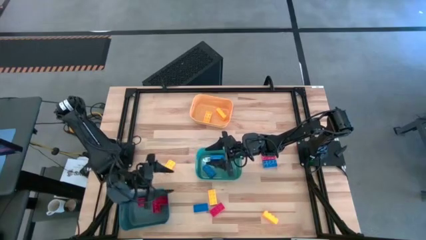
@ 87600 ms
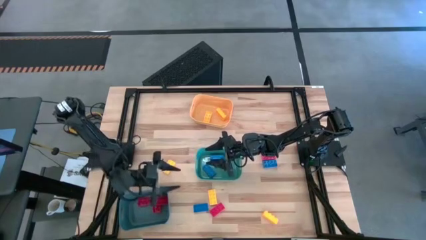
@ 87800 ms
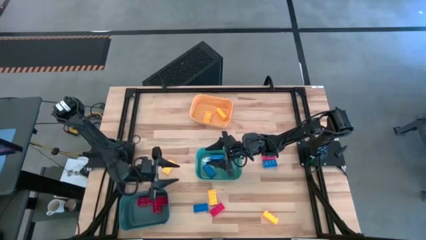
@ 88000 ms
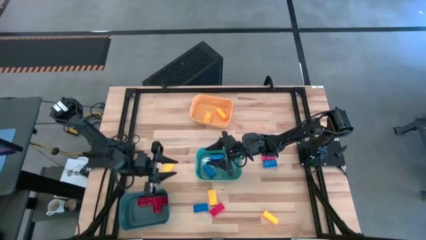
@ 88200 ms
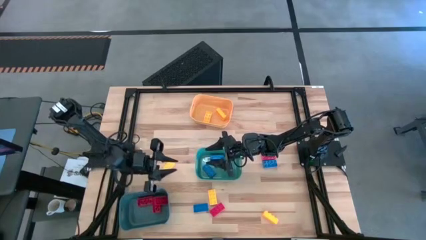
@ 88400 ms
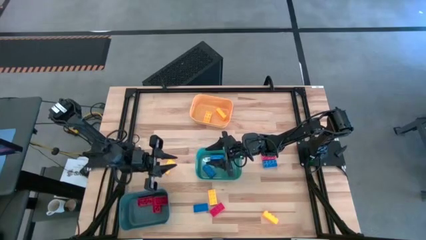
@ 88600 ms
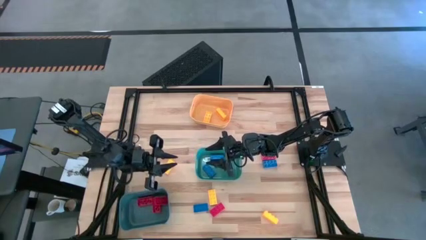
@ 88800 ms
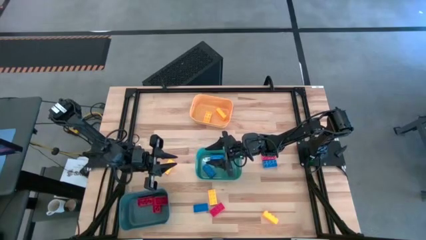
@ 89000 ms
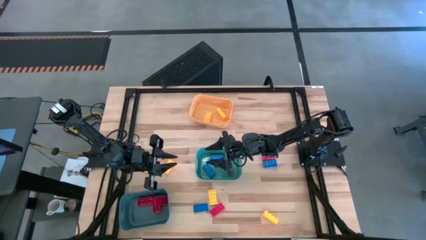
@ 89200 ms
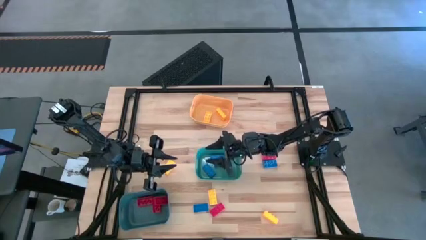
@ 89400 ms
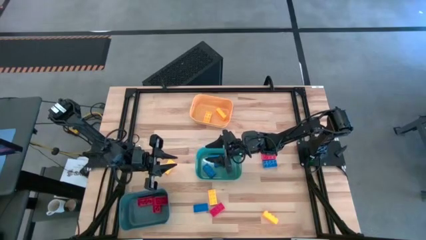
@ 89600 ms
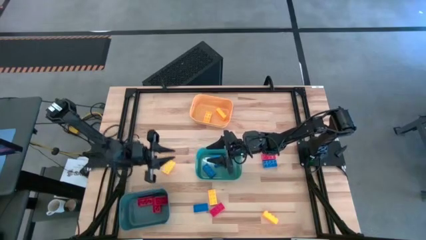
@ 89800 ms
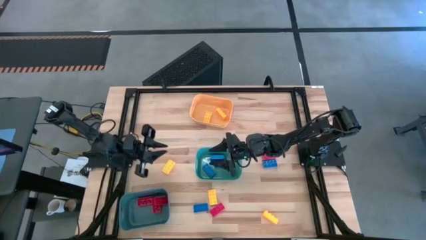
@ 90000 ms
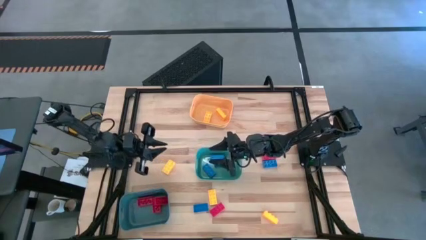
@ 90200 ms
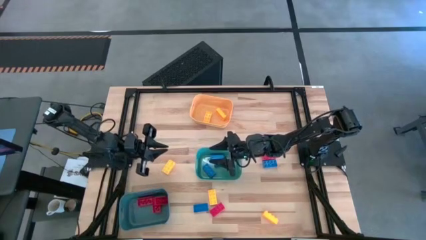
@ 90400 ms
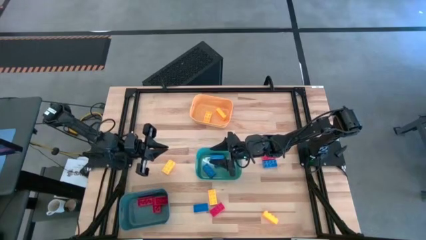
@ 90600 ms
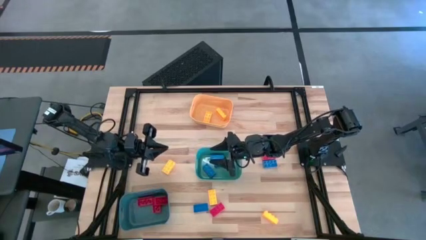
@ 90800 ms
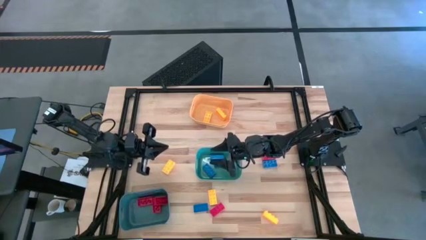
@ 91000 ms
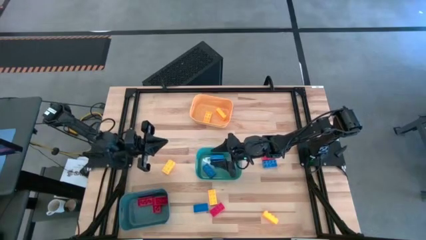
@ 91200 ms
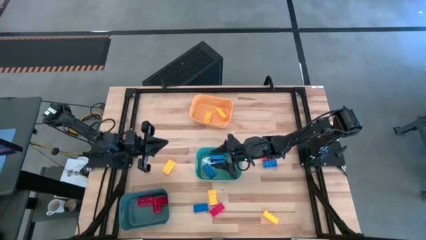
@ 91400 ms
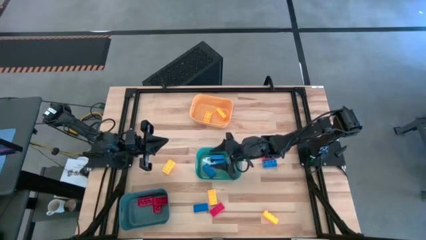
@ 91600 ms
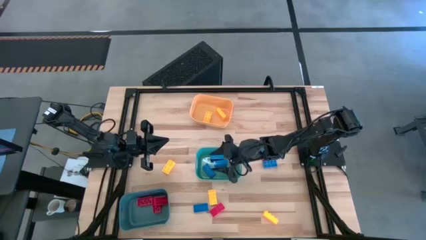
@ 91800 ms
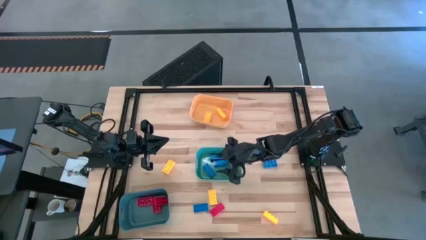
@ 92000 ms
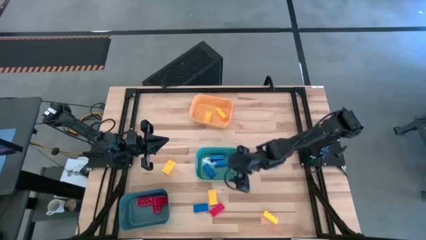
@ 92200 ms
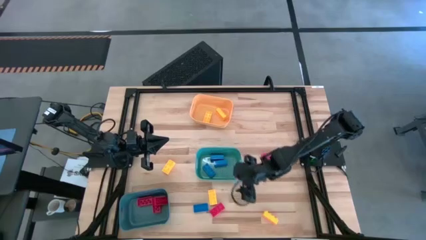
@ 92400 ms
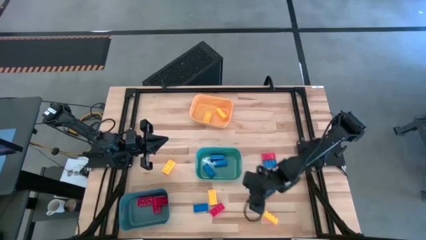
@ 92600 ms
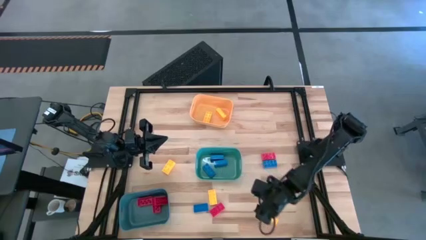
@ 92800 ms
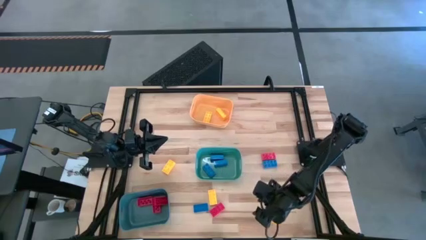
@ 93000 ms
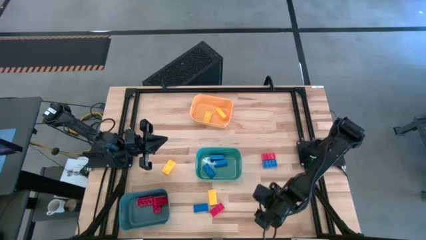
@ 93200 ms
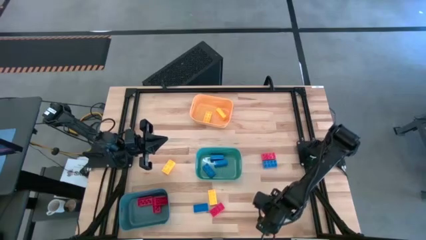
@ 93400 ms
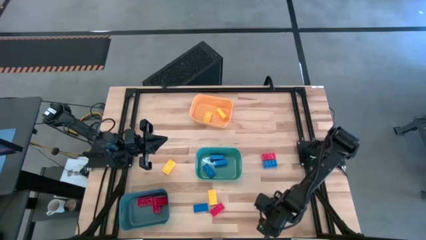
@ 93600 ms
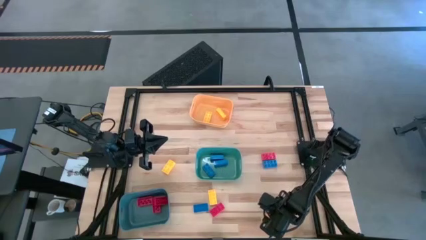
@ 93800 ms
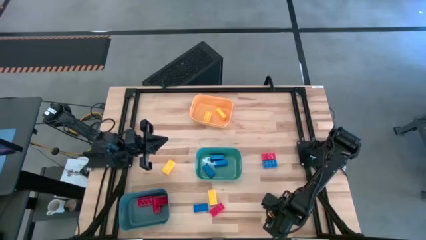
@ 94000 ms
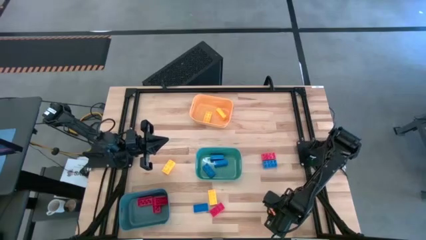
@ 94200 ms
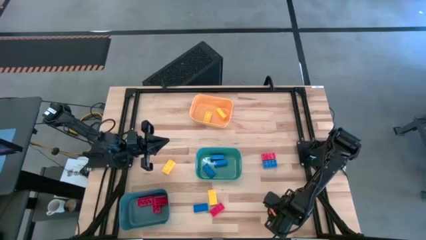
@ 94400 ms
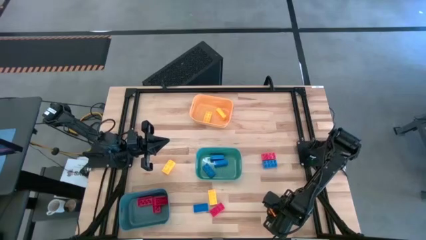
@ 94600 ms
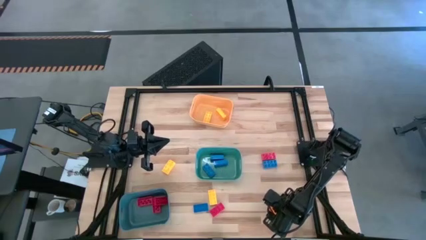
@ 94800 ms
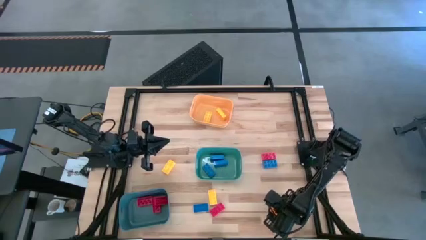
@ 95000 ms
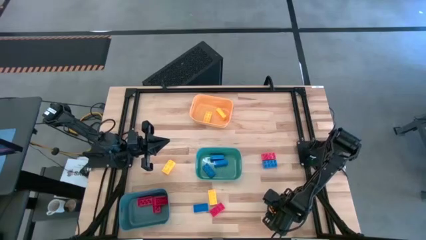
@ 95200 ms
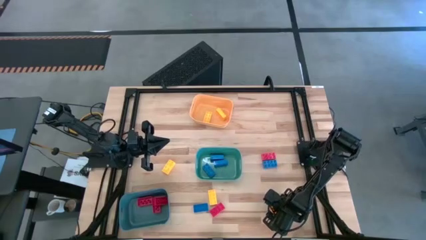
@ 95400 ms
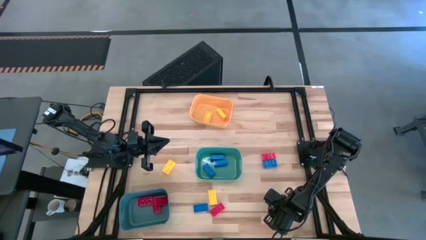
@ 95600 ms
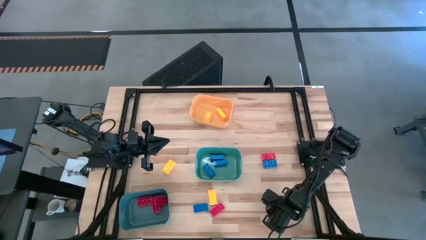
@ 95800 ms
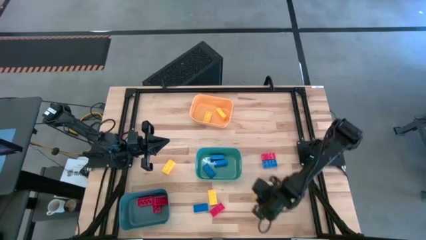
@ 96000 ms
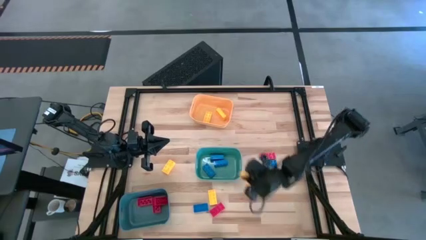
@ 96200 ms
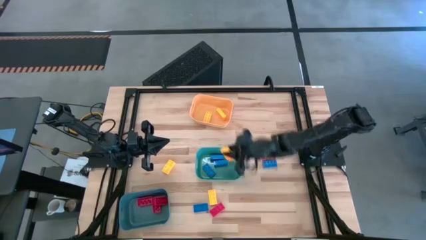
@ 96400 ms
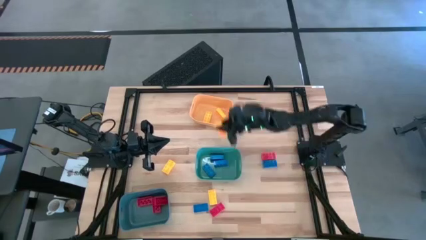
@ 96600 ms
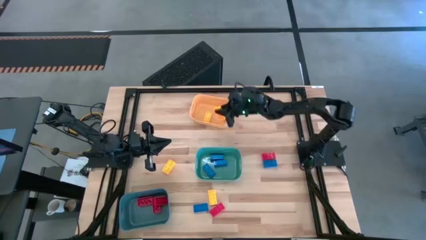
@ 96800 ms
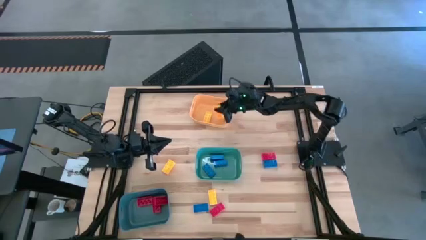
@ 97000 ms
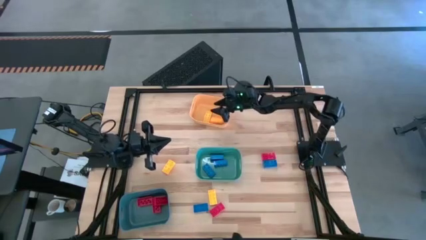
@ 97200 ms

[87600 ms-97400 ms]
Task: Sort & place blocks by color
Put the yellow game piece into the yellow bin

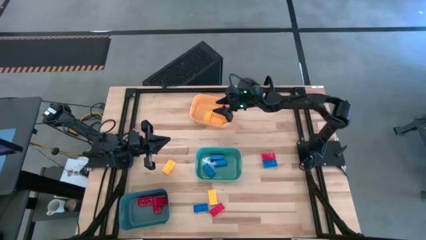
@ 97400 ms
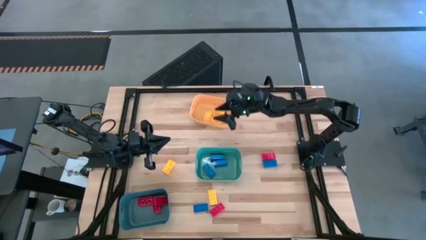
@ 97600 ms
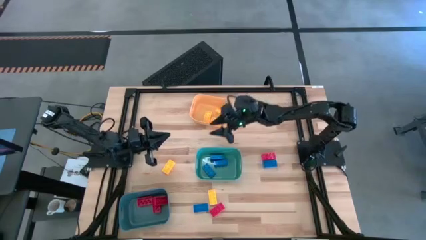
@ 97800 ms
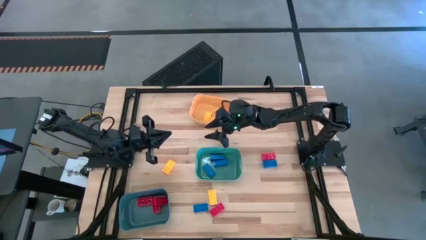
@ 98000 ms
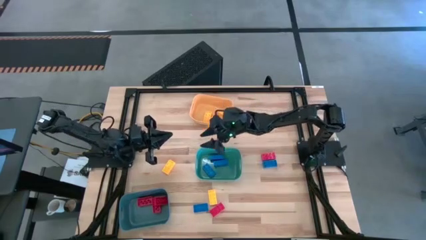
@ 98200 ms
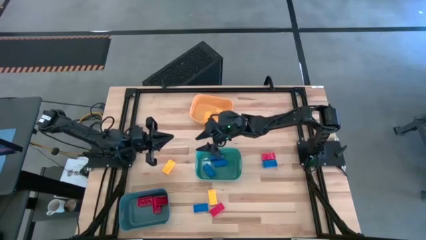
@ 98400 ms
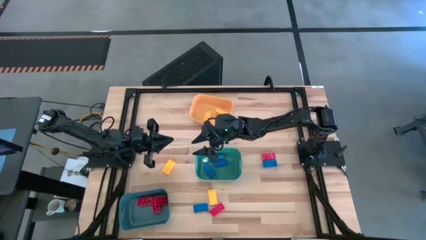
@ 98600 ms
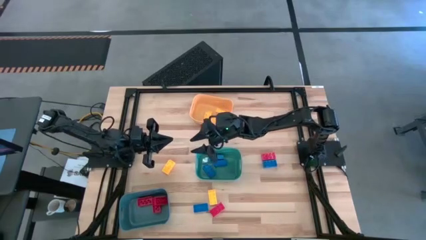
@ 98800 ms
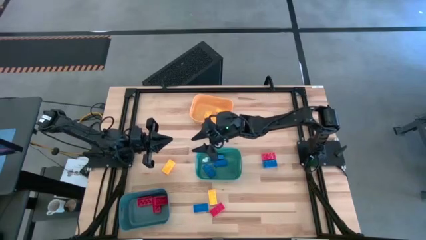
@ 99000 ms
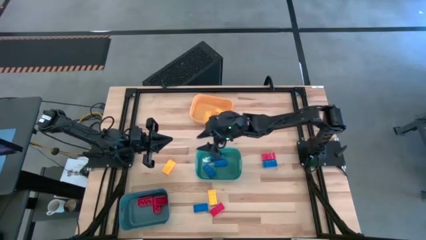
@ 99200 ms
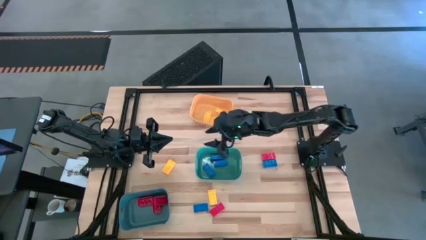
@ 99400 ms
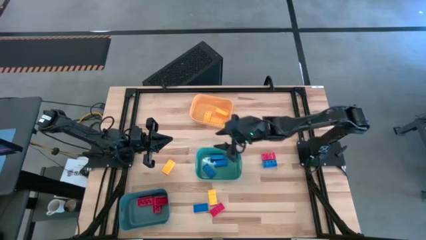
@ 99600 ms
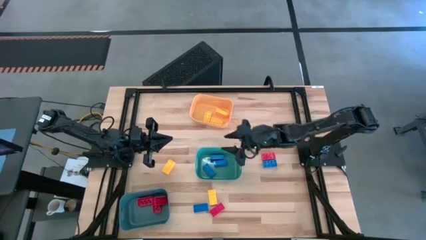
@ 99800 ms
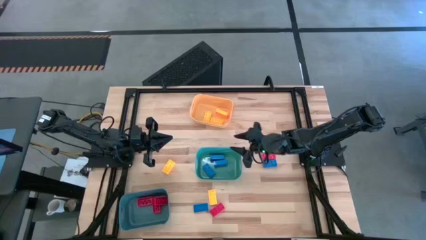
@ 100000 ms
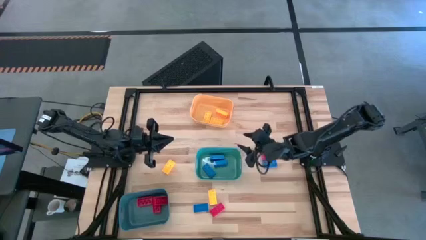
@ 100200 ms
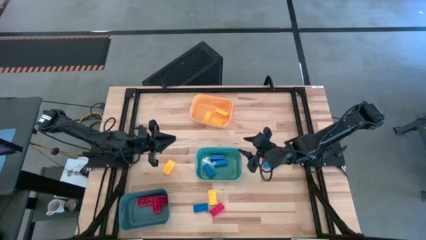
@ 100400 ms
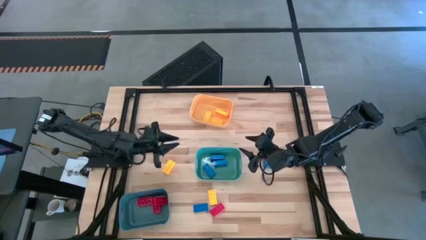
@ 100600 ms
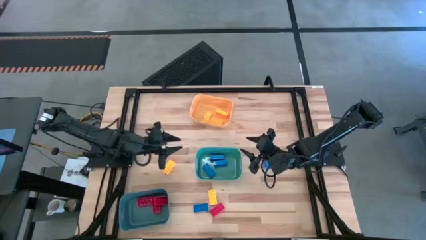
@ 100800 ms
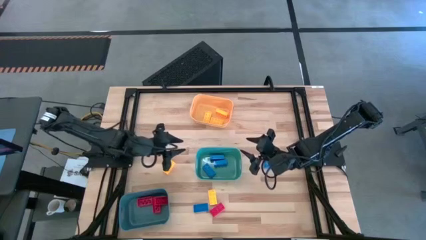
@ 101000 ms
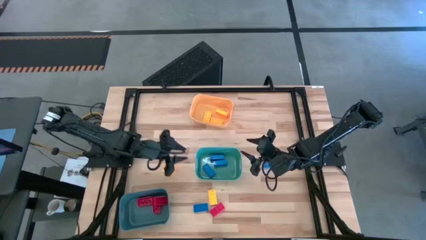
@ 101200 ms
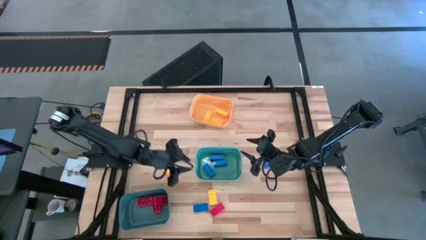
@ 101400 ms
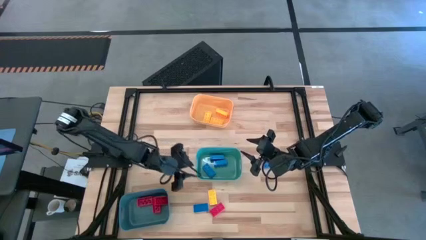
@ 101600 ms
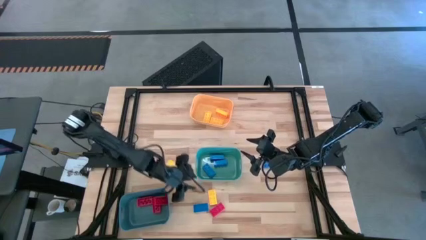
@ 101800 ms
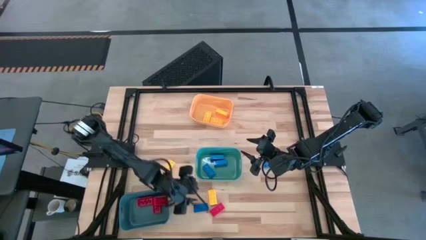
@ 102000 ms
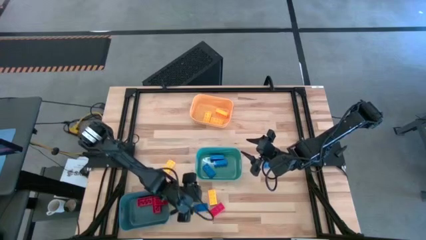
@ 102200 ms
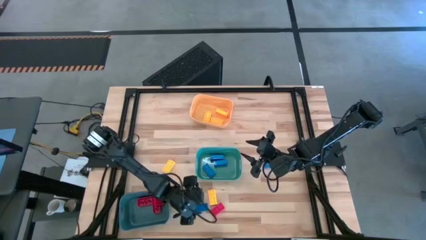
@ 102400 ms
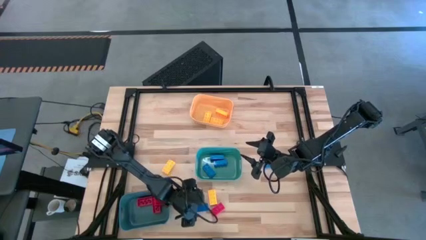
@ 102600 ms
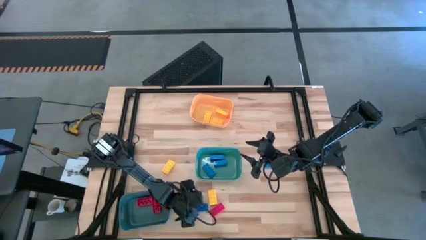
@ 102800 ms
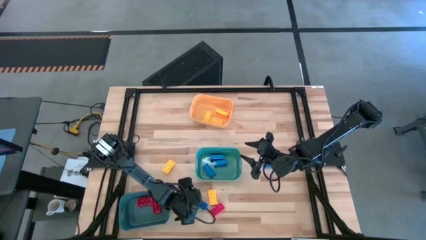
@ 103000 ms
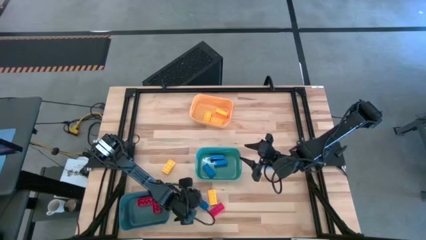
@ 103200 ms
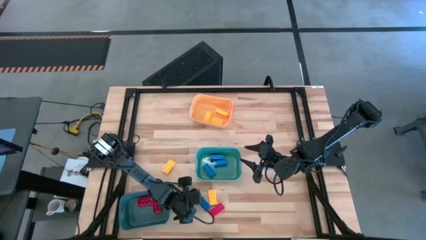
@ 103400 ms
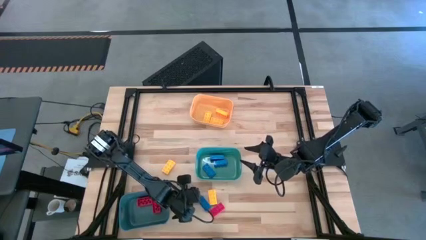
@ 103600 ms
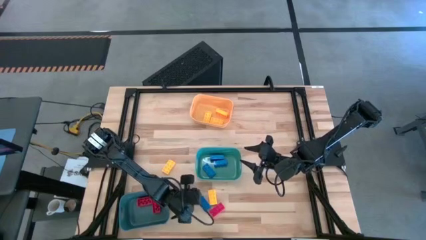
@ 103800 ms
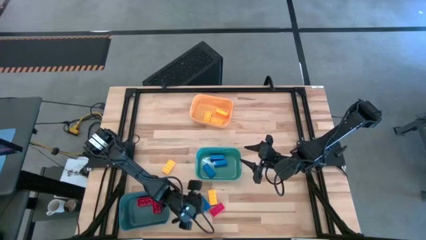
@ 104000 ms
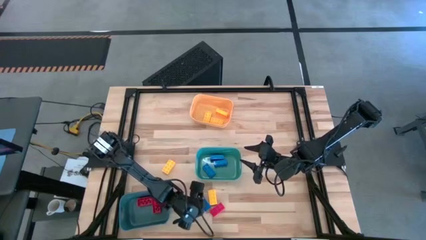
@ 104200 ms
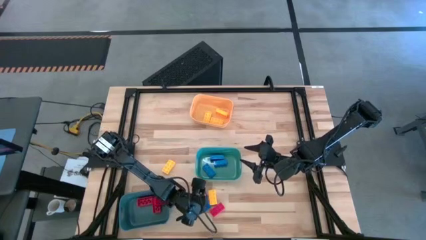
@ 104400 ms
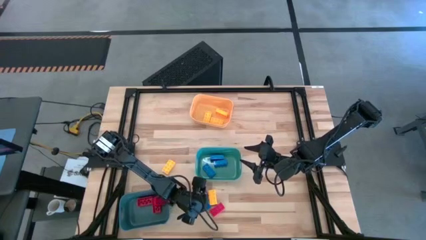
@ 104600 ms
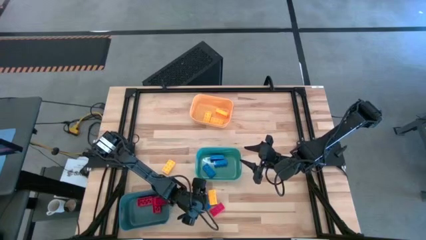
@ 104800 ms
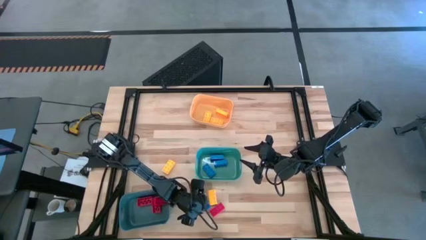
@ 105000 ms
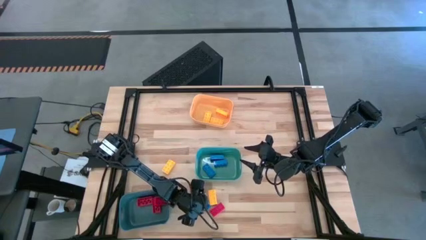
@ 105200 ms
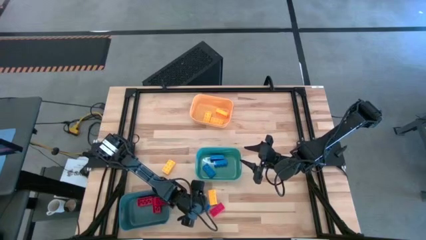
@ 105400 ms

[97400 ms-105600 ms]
Put the blue game piece into the green bin

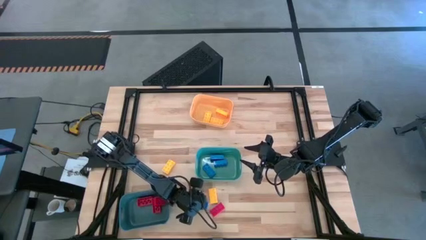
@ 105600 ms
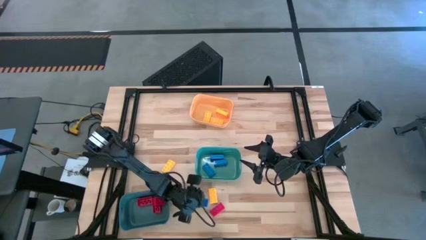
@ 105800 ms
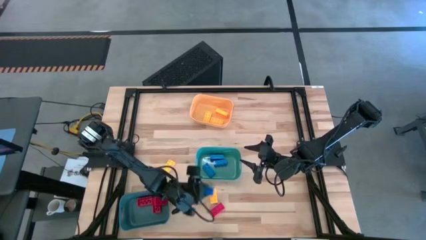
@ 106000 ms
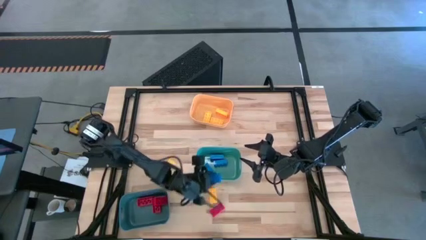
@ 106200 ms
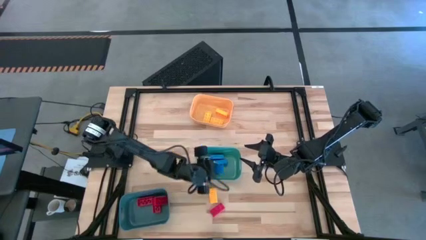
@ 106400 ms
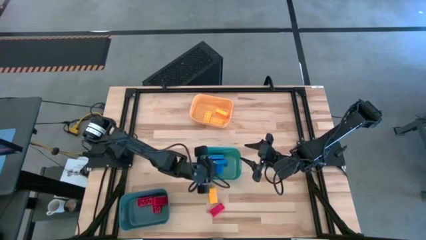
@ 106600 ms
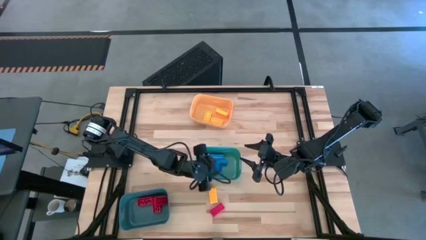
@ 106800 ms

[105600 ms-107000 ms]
Put the blue game piece into the green bin
